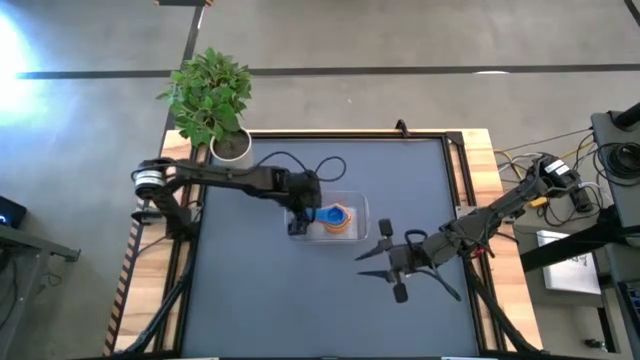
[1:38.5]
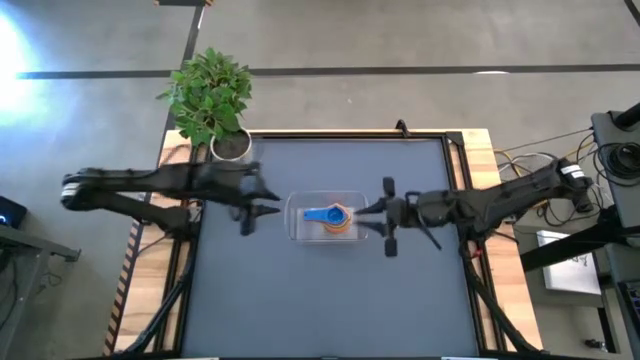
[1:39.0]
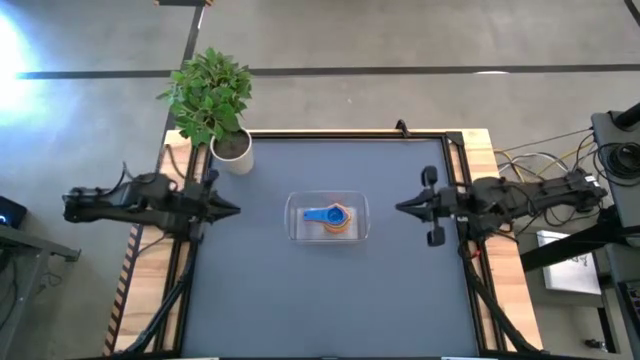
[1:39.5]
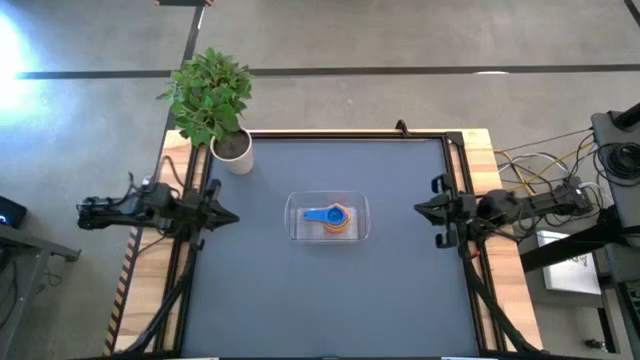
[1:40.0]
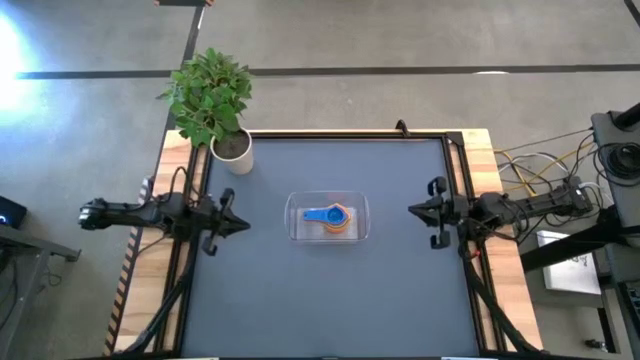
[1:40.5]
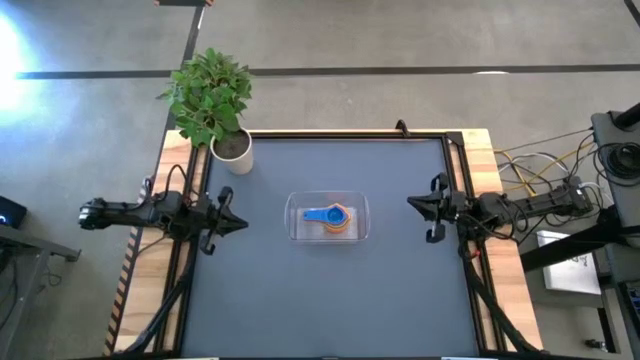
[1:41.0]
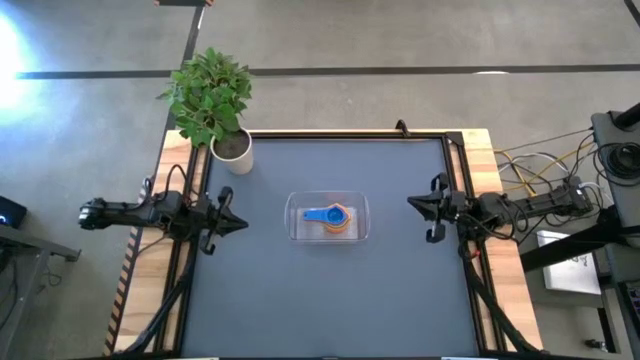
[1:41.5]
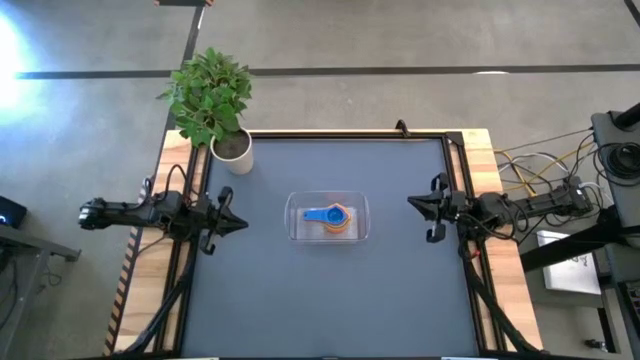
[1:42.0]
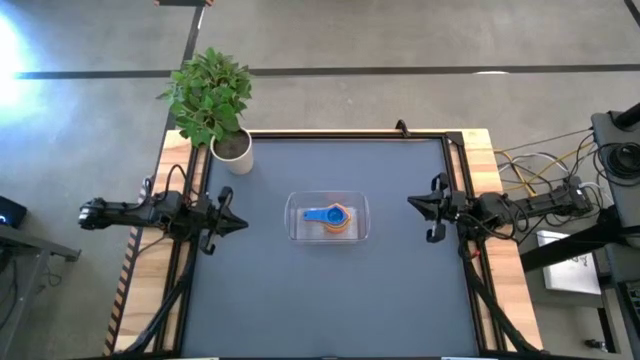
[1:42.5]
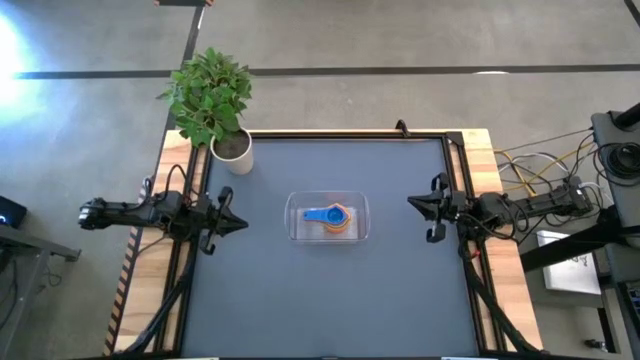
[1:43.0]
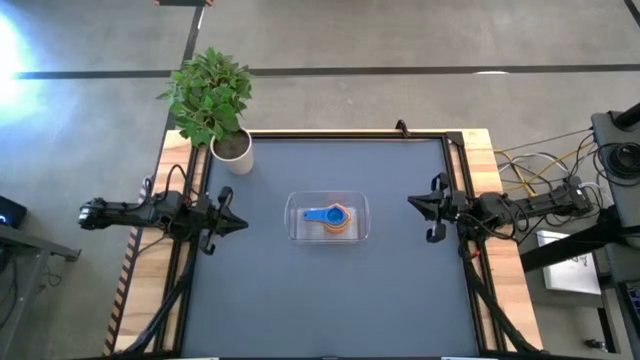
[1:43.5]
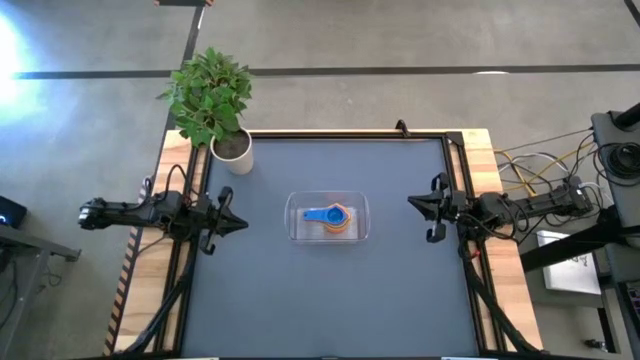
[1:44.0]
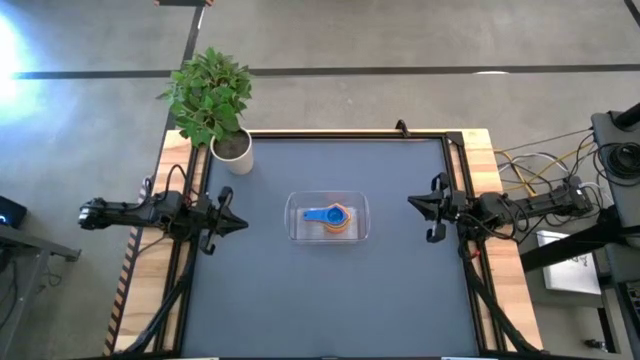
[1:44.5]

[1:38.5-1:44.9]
Task: Nest measuring cups in basket
Return to Home Position

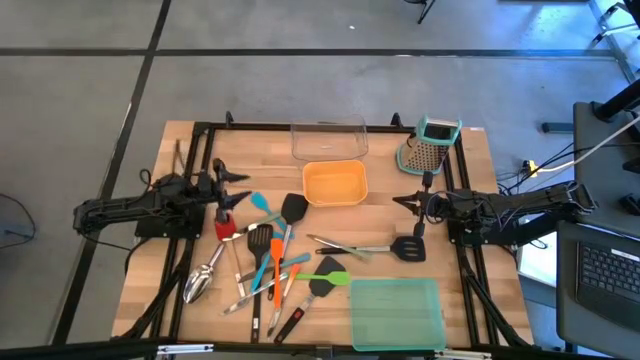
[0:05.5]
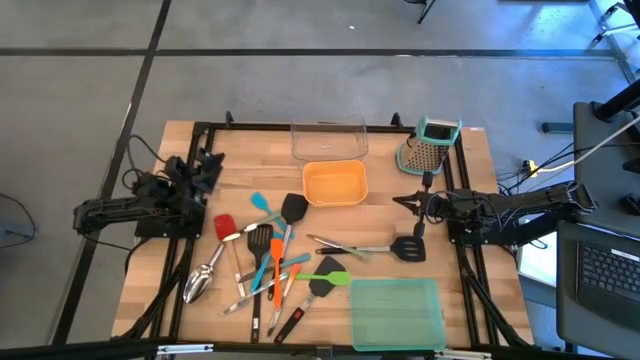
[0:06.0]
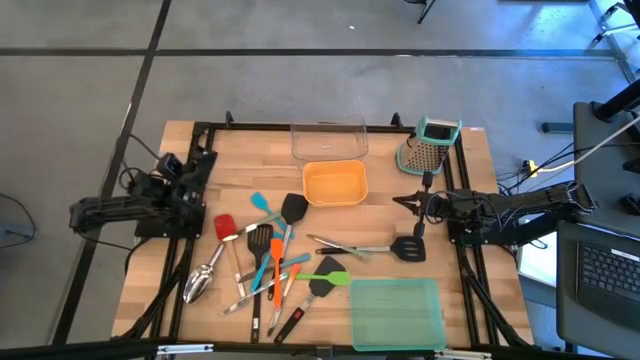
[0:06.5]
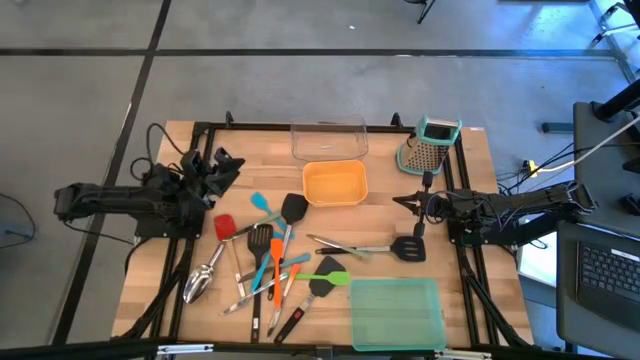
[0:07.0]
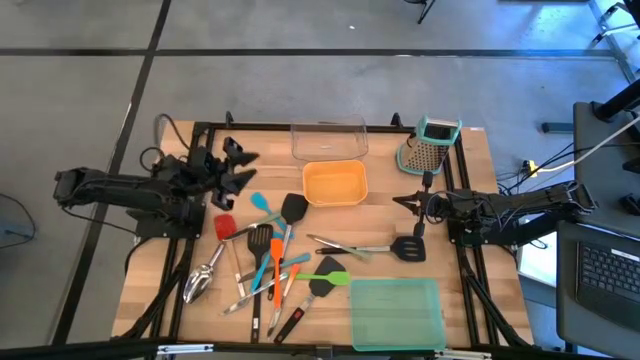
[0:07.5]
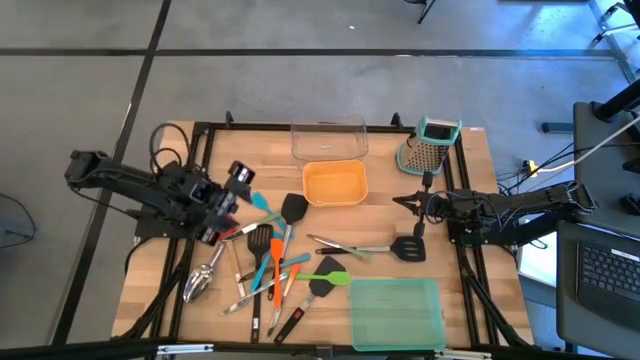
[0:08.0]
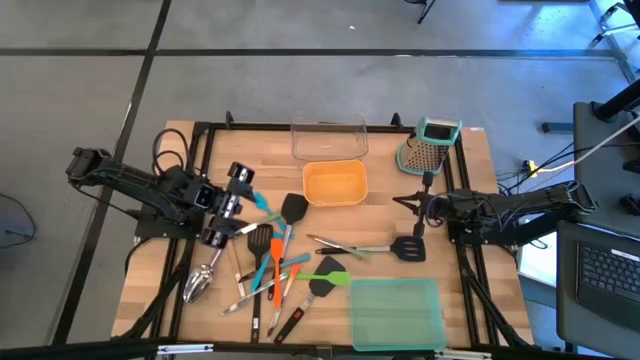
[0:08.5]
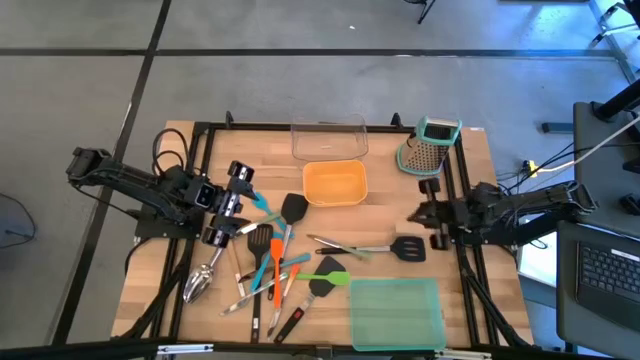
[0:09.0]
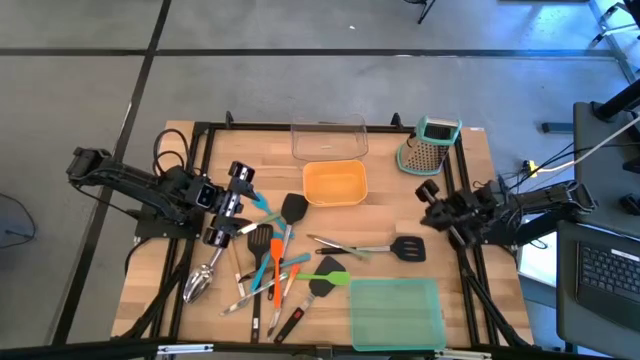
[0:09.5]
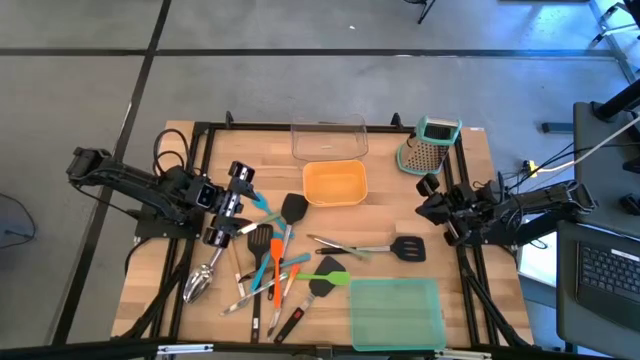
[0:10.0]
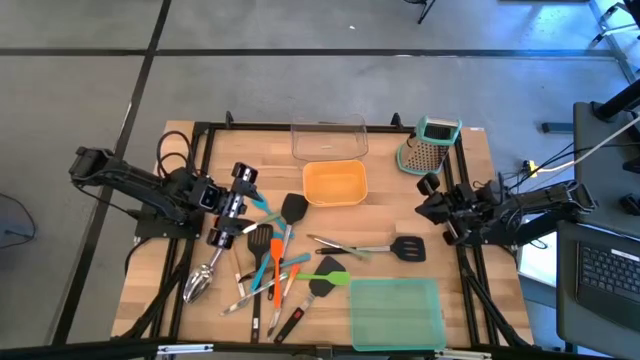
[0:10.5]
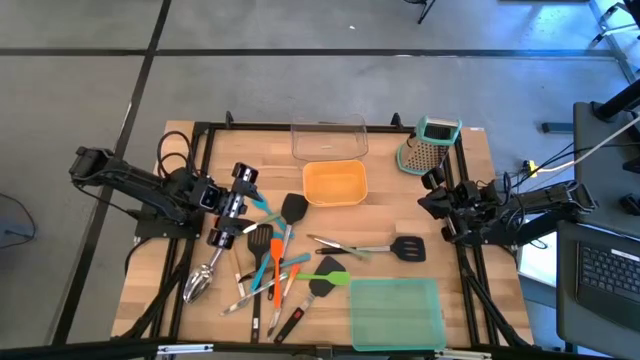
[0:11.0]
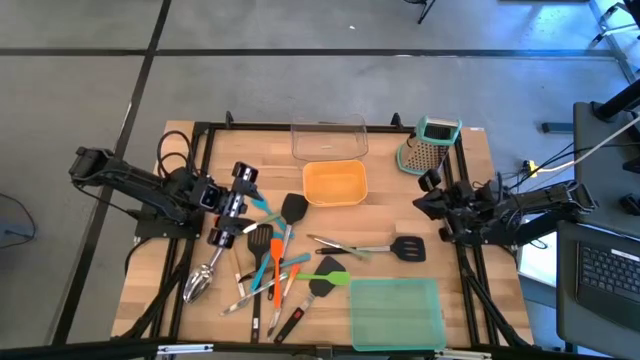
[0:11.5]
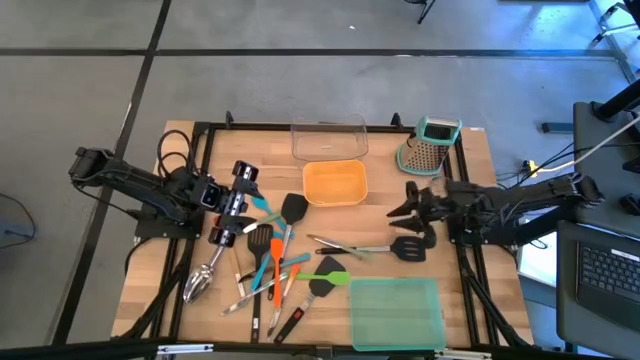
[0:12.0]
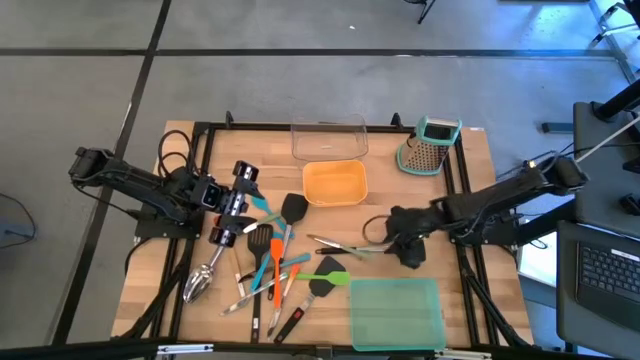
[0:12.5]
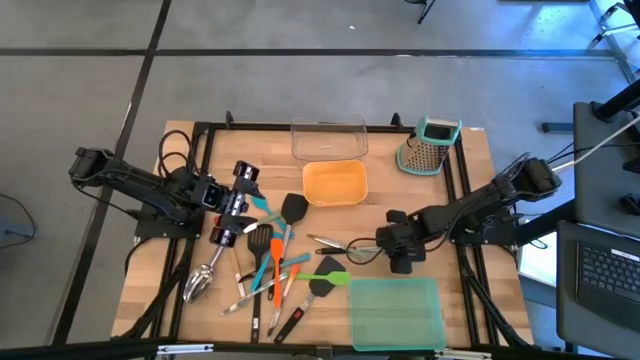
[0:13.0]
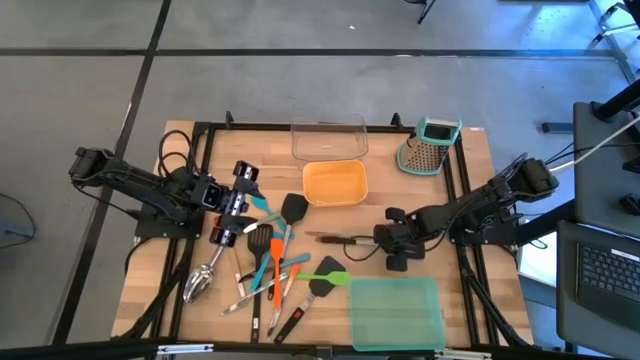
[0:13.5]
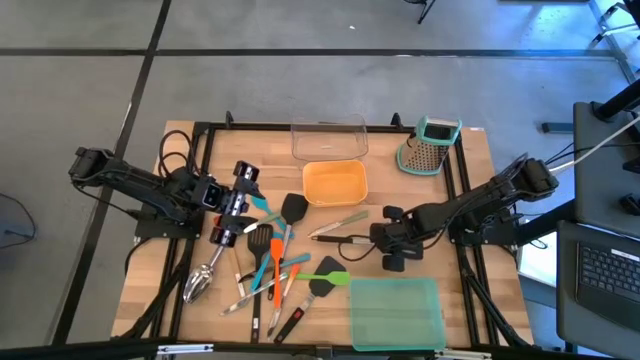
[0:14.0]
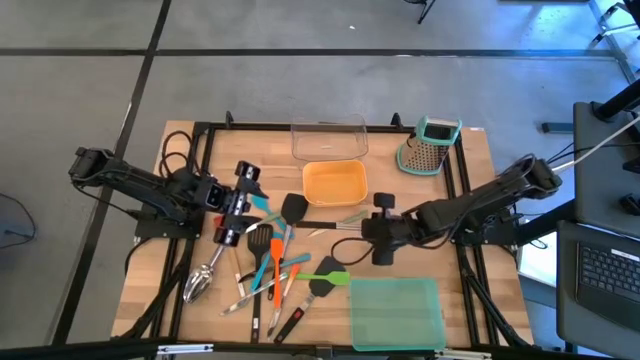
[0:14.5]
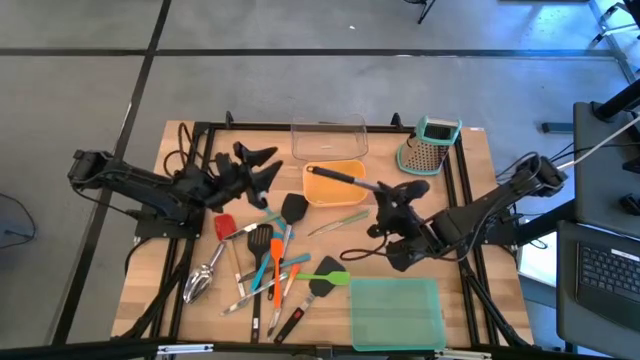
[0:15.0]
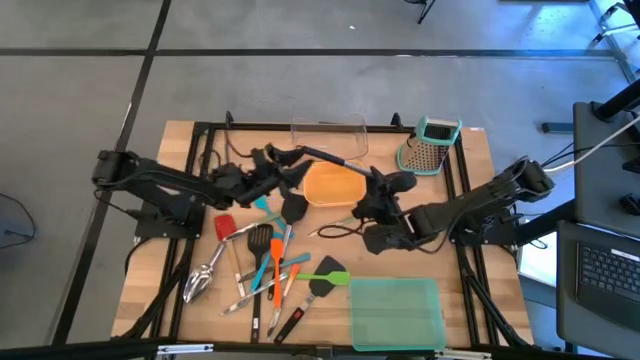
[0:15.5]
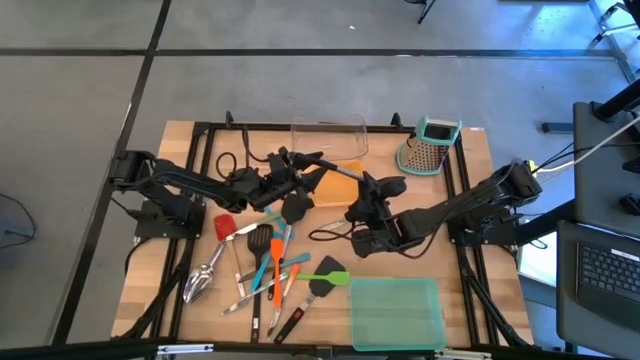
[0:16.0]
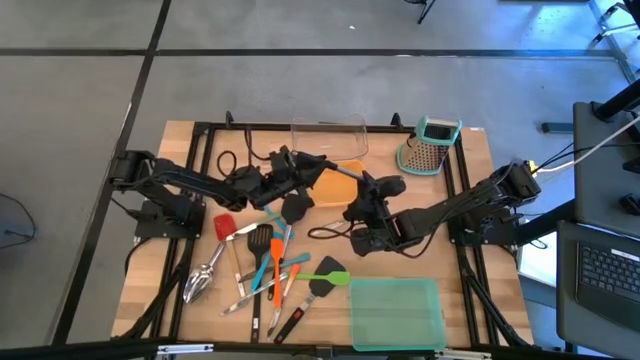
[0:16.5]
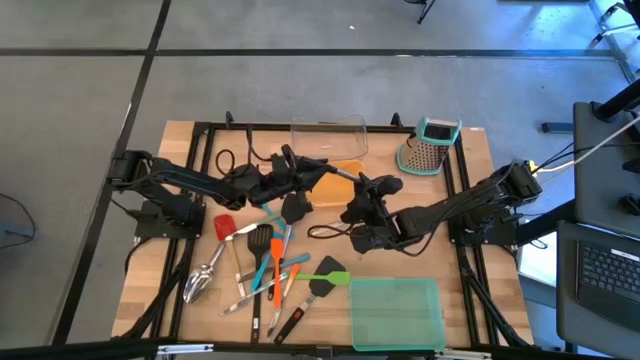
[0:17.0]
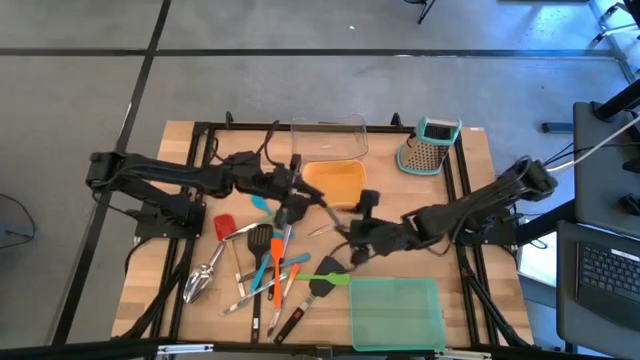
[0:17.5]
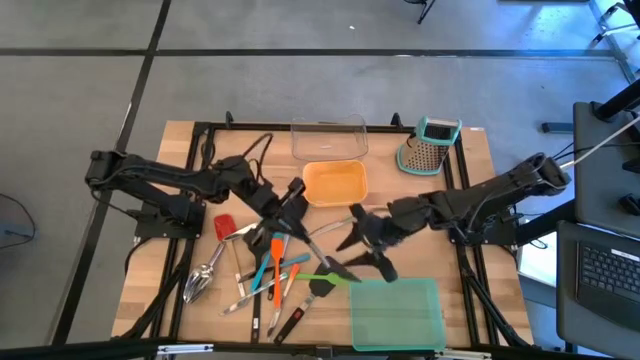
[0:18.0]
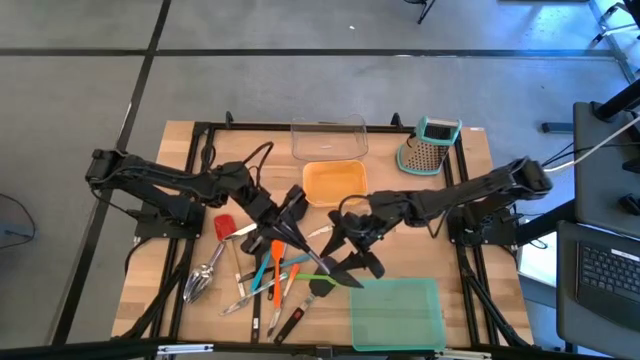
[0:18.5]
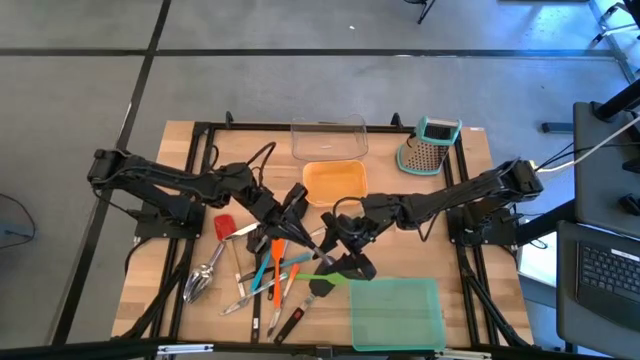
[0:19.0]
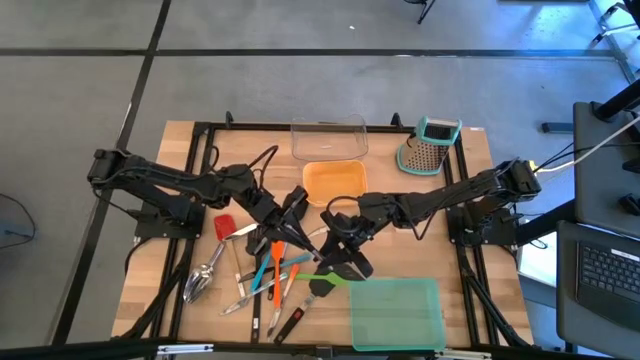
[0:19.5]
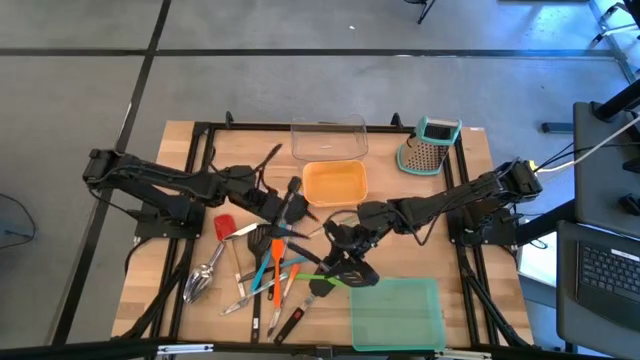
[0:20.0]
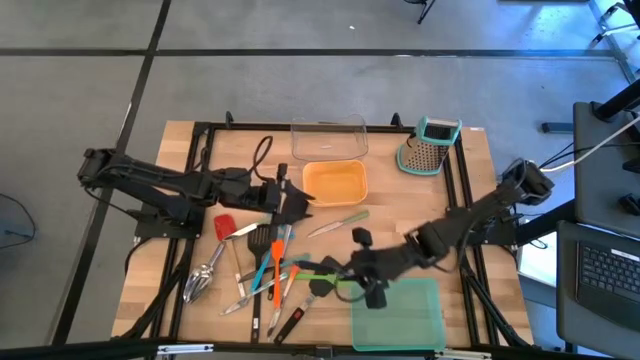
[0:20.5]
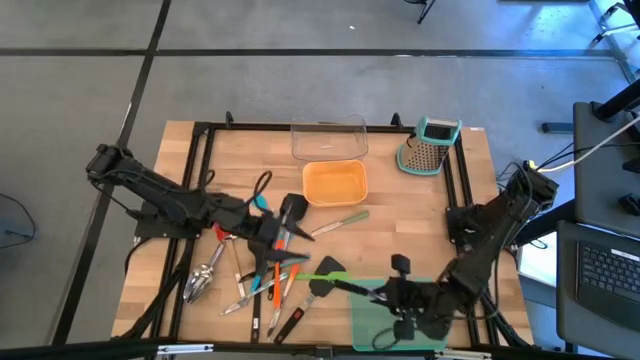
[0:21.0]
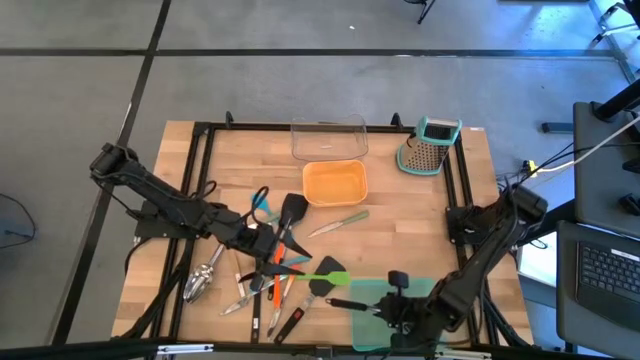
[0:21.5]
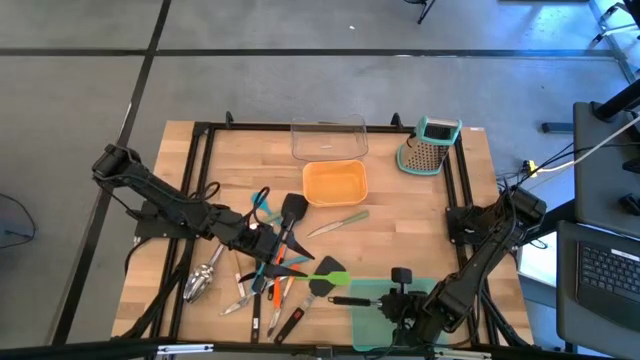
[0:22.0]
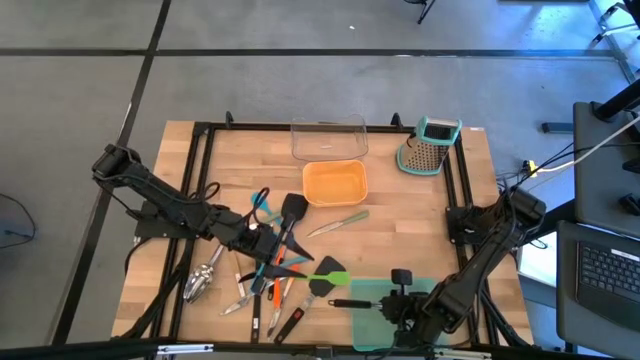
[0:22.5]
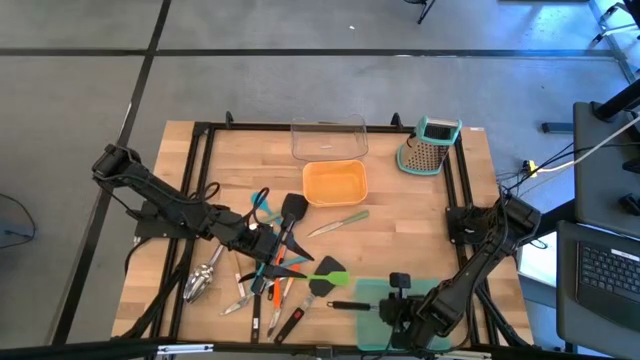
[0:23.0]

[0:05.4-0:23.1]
Task: Pick & Place Kitchen Items
Put the black spatula into the green bin
